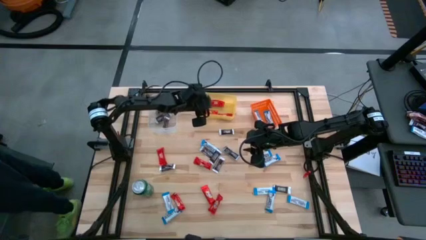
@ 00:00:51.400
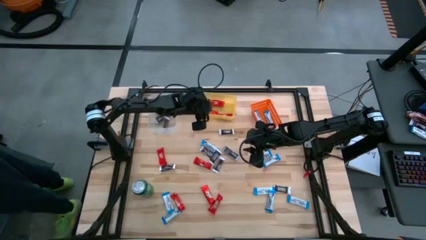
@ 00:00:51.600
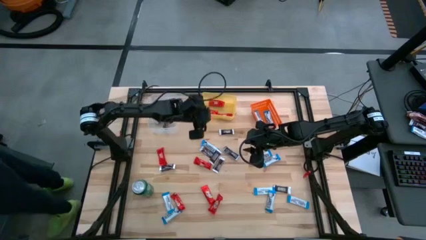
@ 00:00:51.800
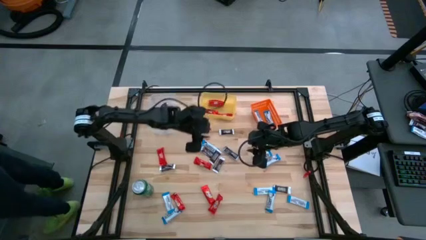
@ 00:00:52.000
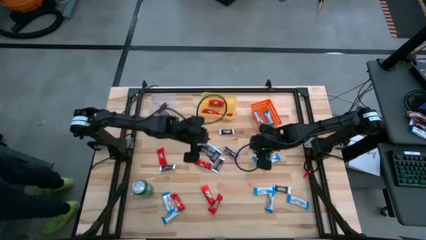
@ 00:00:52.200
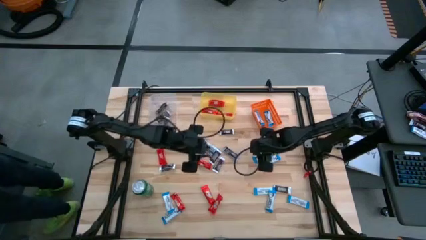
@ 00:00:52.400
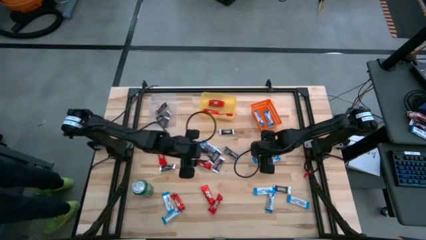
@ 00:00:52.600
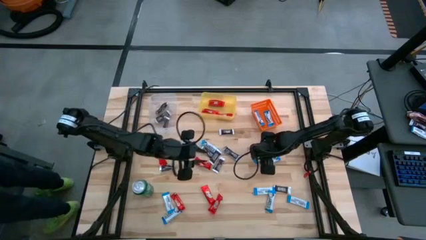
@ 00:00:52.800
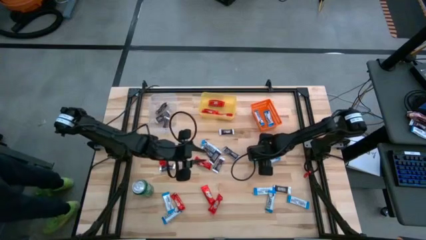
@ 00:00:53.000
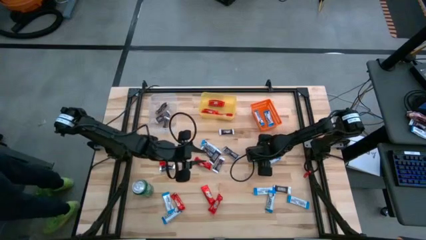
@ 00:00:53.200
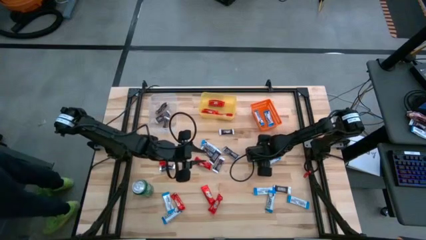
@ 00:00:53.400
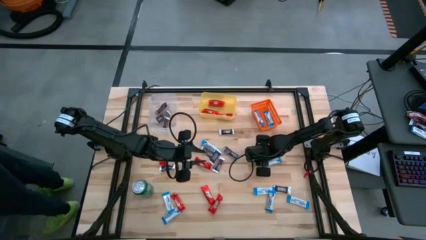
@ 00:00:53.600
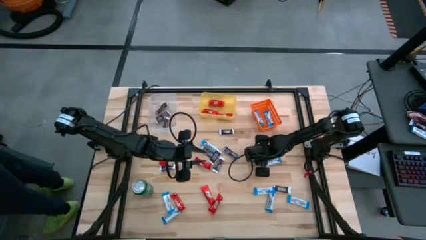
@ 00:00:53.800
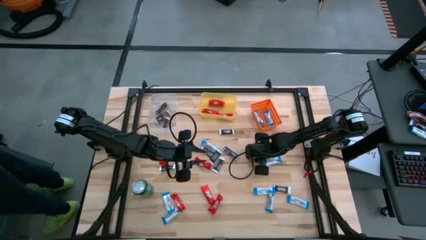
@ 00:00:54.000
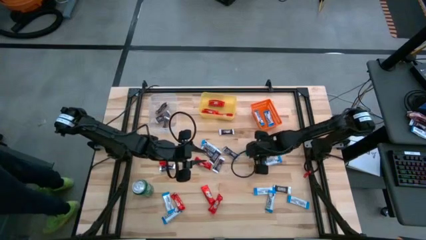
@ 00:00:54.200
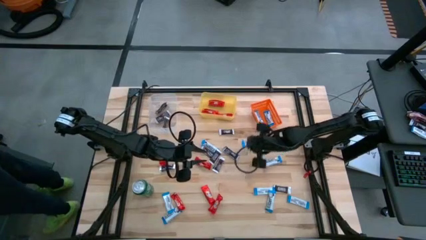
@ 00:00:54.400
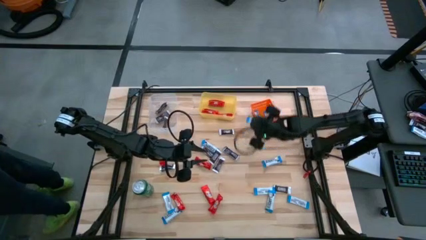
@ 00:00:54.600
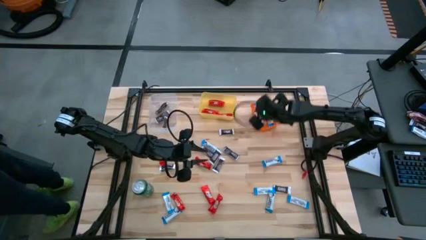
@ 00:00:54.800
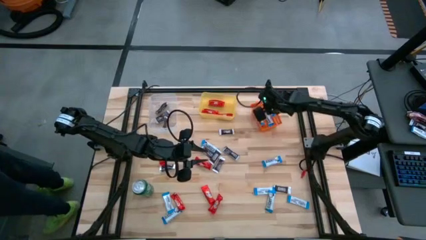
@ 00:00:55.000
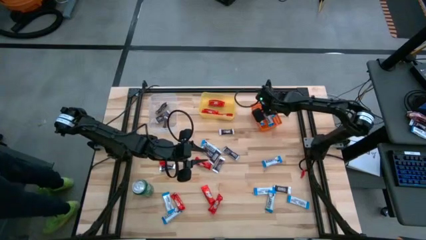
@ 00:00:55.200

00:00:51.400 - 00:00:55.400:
Task: Sort candy
Put the white chocolate bar into the orange bin

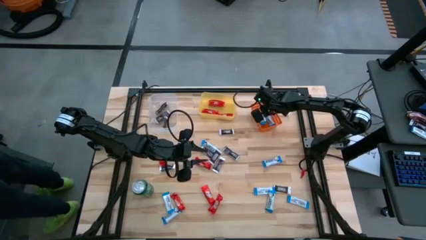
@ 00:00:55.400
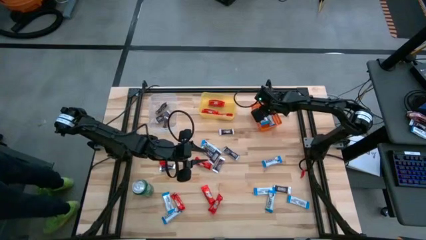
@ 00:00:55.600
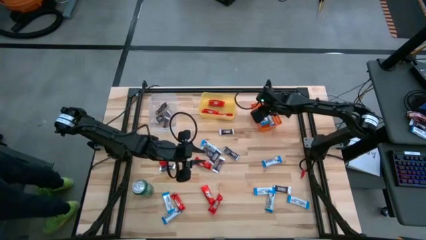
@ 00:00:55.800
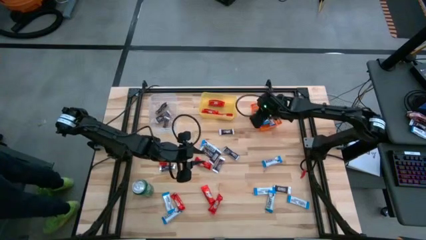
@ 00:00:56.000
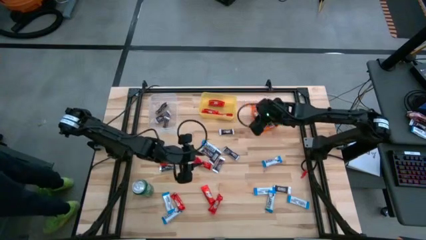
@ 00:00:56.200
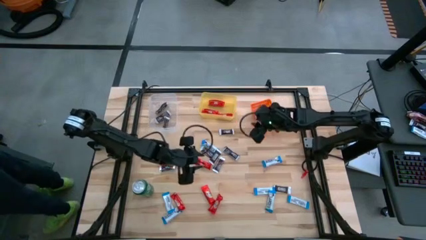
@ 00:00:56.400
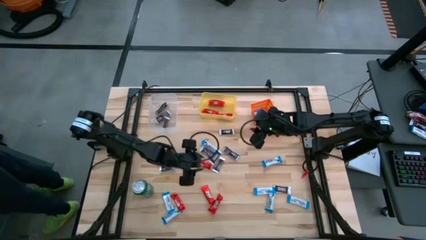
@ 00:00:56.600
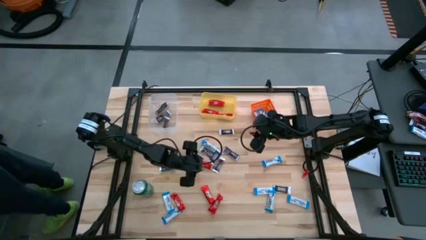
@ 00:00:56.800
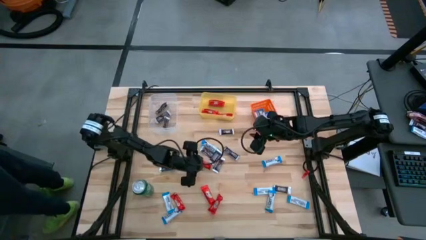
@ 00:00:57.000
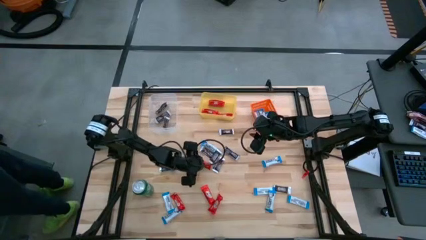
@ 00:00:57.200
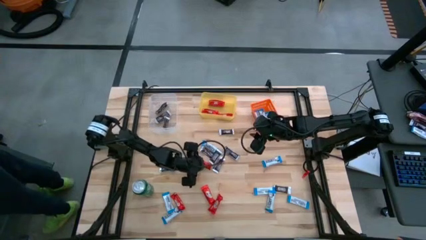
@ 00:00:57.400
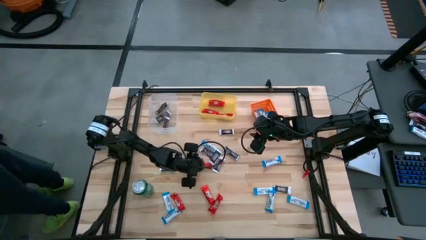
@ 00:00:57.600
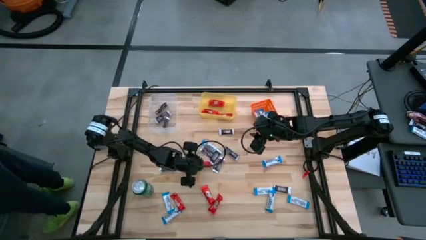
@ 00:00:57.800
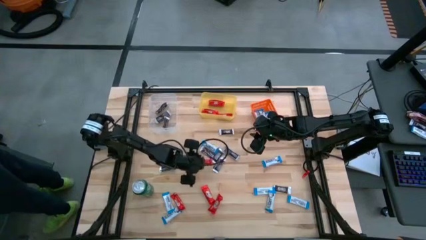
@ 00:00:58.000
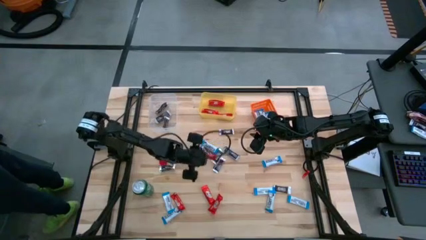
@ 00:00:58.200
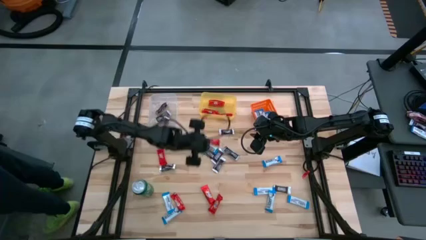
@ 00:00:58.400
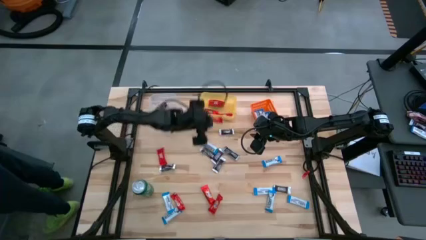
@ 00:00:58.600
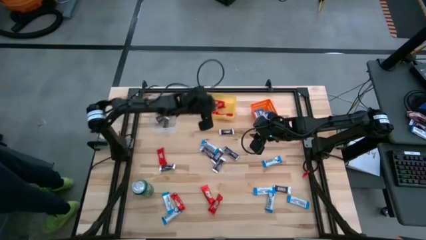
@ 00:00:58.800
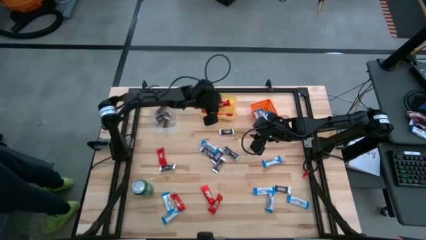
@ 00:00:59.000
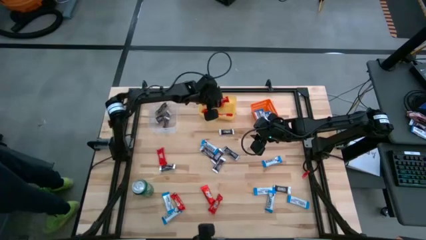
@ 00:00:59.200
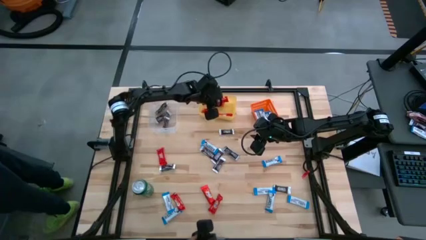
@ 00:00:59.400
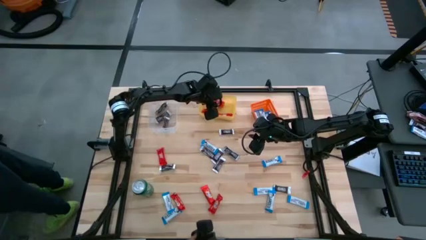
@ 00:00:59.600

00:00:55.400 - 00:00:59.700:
Put the red chocolate bar into the yellow bin

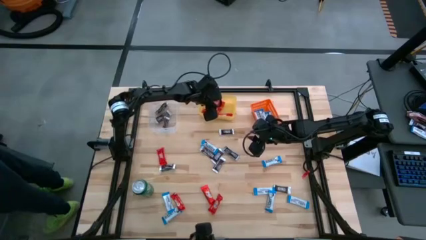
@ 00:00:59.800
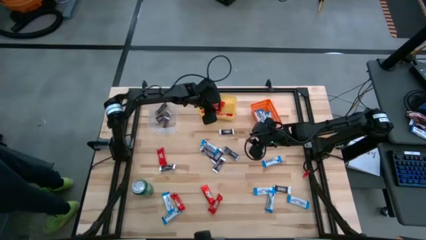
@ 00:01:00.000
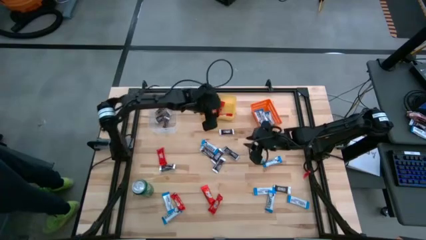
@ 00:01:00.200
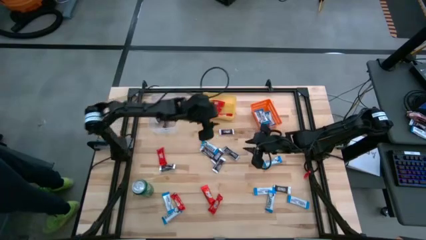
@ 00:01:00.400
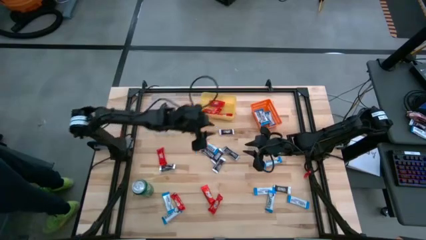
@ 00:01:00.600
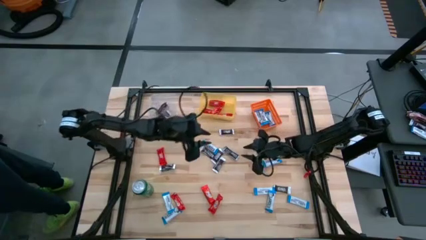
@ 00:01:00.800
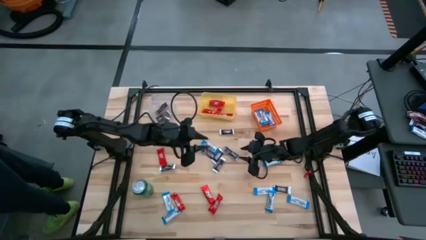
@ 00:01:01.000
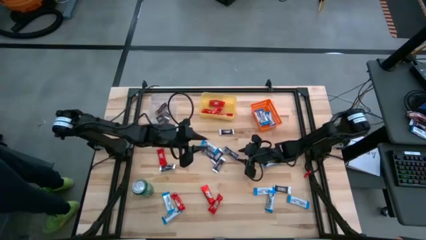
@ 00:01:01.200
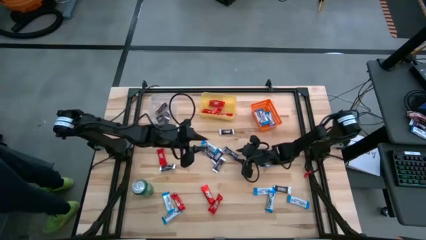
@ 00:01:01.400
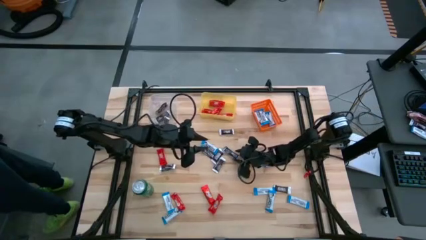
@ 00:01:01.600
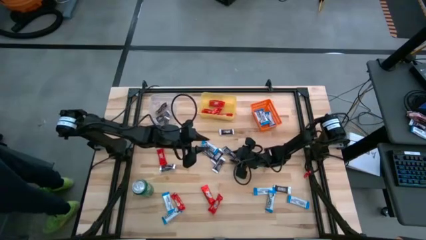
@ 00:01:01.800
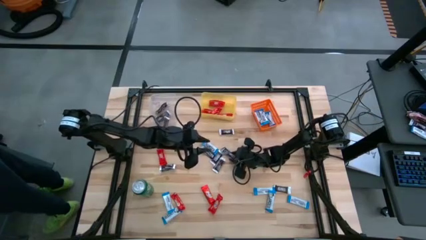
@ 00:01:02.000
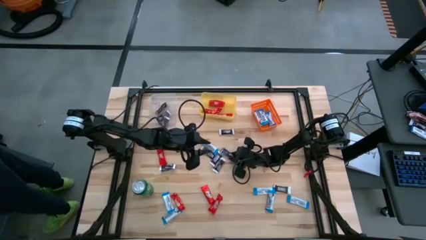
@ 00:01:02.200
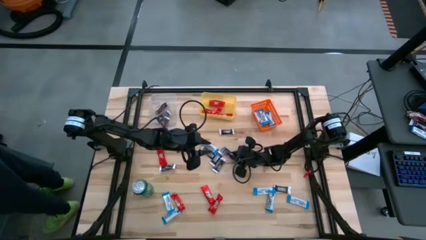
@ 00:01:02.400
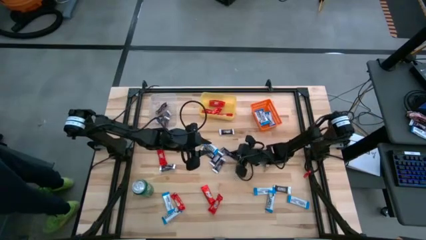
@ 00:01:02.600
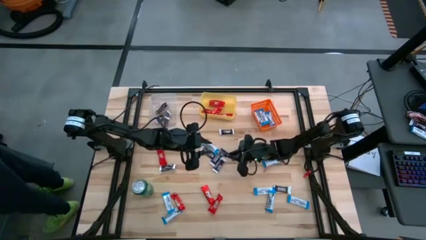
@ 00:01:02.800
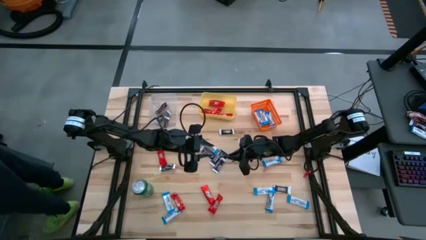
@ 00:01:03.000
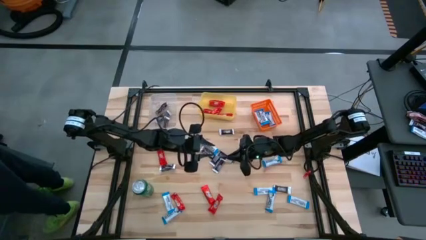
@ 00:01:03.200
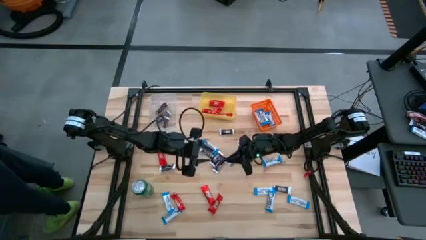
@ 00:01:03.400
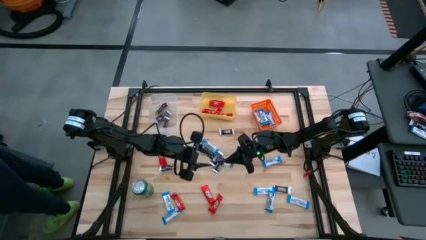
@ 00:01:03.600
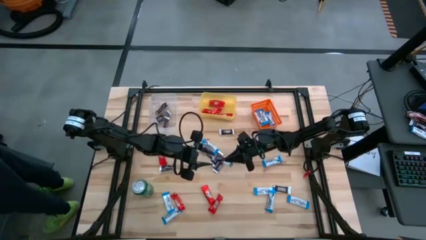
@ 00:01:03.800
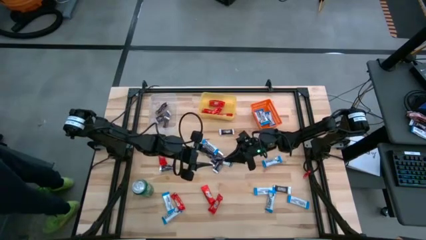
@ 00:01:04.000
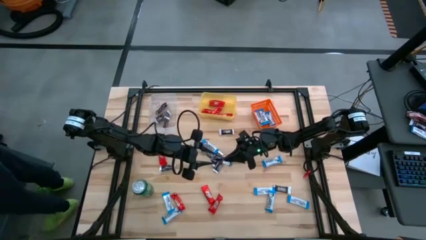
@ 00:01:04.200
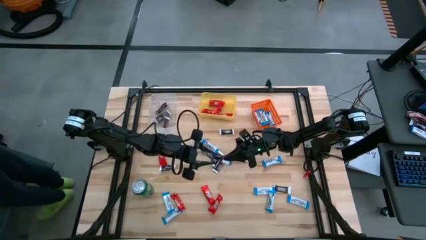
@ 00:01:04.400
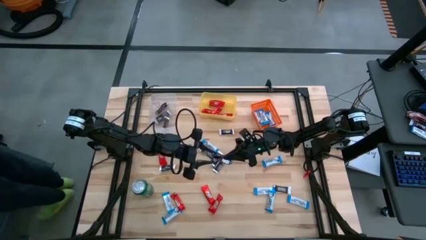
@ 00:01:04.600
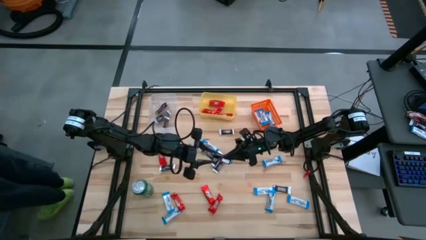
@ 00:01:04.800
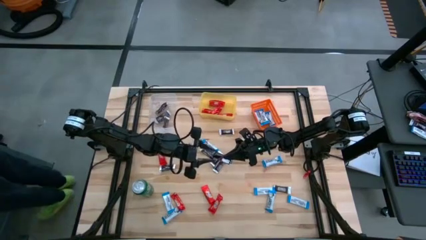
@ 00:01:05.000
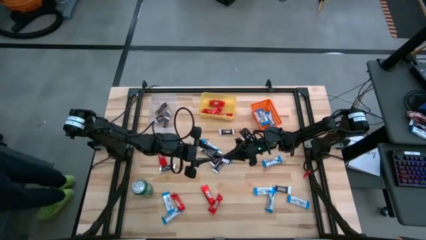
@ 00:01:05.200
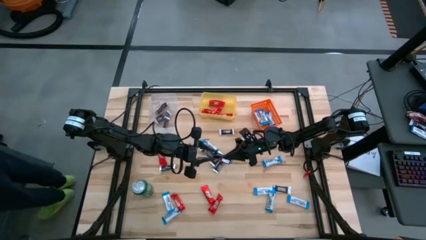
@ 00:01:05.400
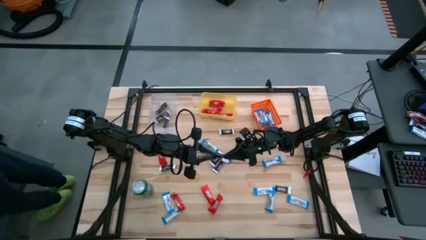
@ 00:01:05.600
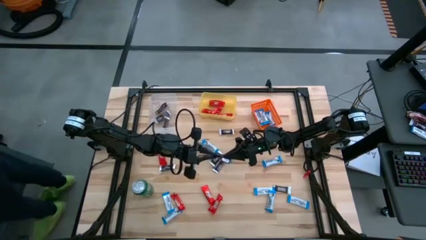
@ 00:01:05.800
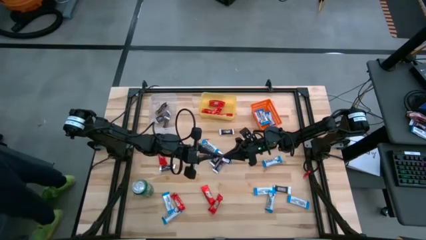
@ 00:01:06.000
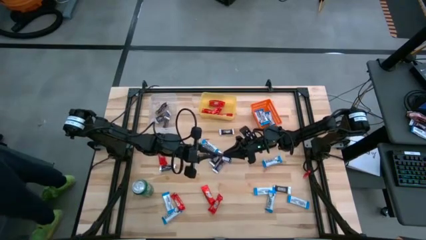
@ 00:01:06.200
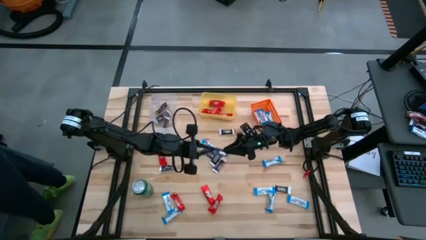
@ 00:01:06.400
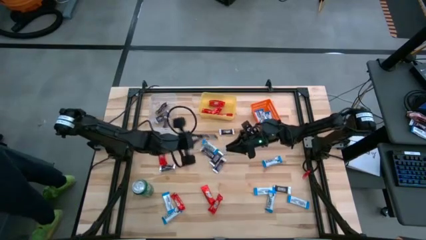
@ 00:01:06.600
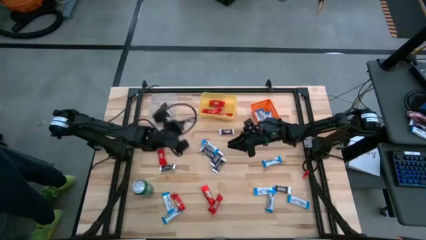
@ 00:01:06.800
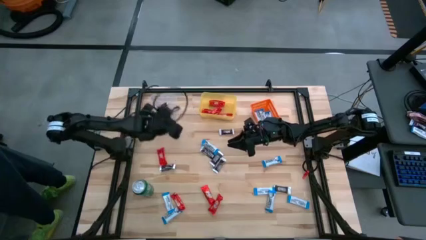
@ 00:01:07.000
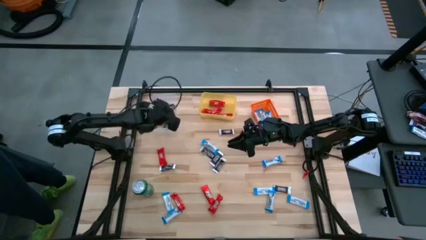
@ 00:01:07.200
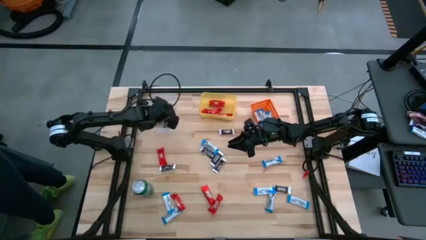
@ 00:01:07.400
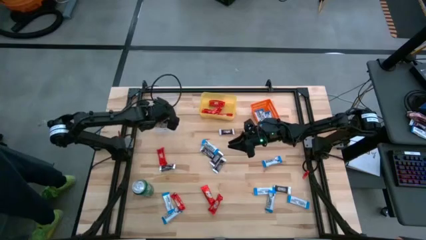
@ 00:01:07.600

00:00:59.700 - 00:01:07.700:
Put the brown chocolate bar into the transparent bin
